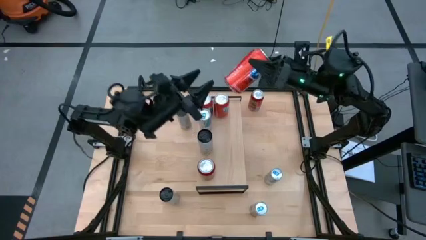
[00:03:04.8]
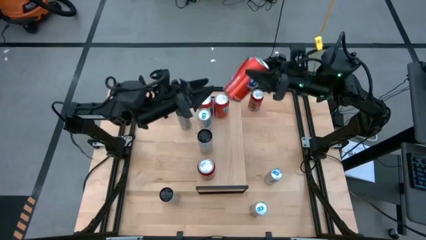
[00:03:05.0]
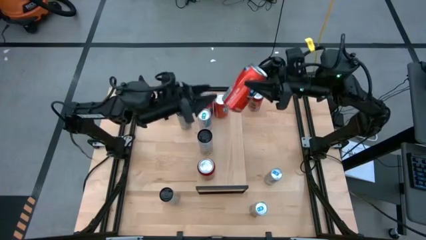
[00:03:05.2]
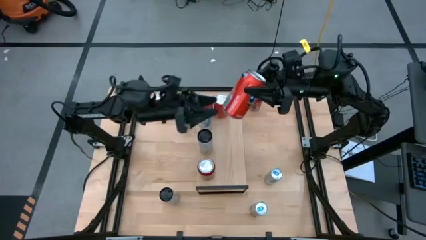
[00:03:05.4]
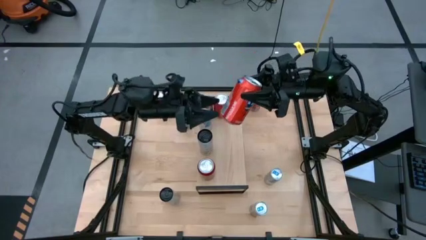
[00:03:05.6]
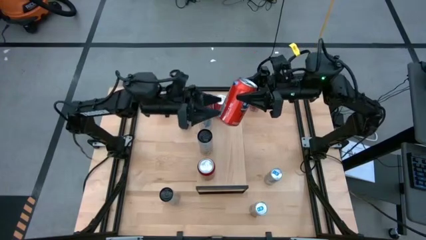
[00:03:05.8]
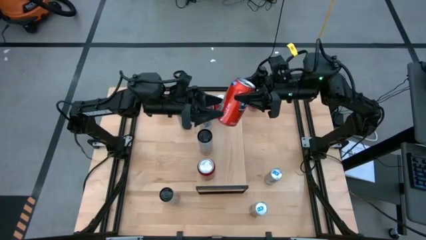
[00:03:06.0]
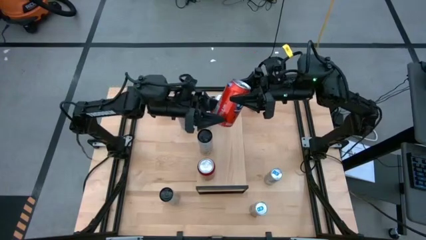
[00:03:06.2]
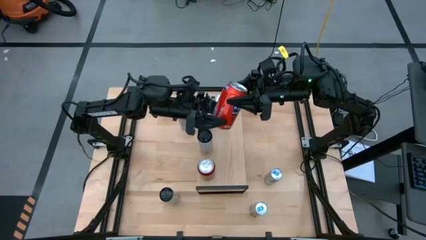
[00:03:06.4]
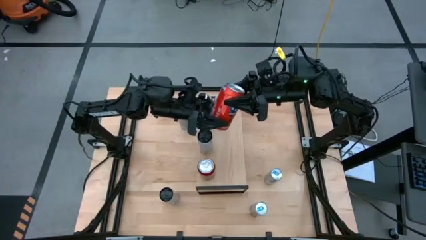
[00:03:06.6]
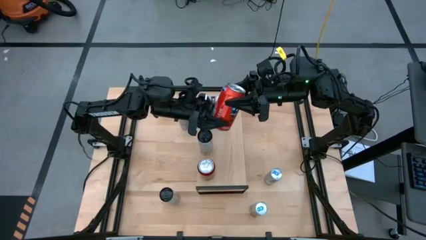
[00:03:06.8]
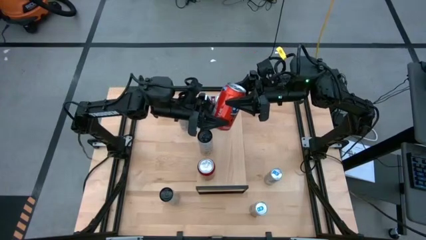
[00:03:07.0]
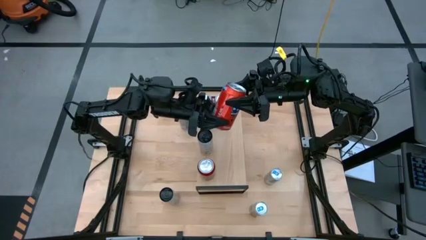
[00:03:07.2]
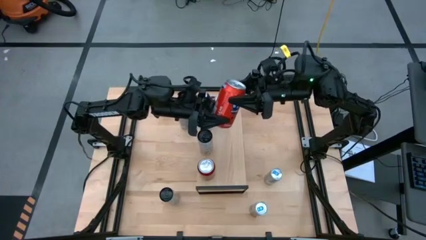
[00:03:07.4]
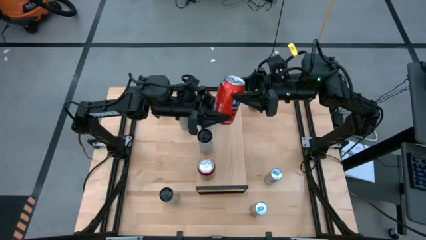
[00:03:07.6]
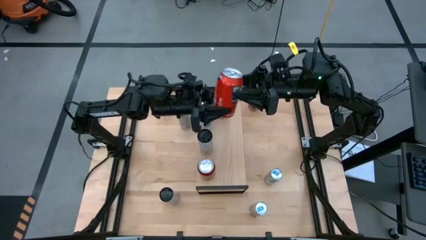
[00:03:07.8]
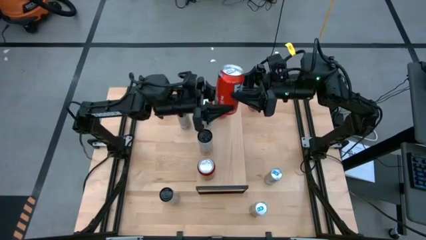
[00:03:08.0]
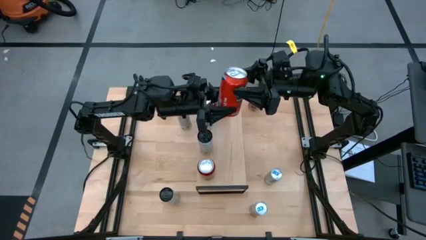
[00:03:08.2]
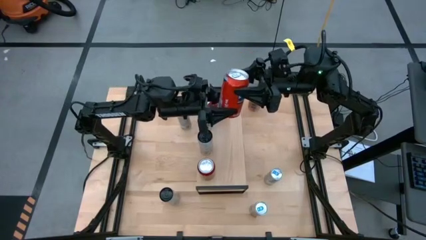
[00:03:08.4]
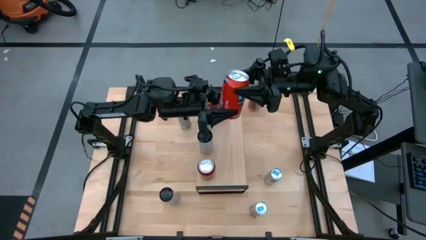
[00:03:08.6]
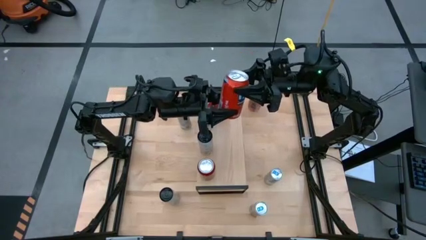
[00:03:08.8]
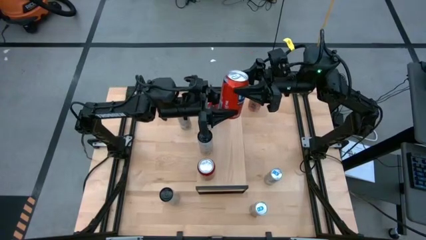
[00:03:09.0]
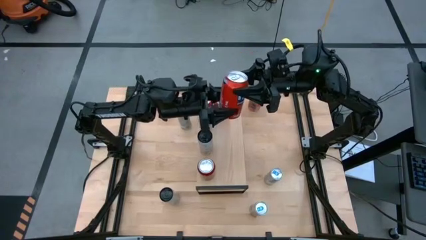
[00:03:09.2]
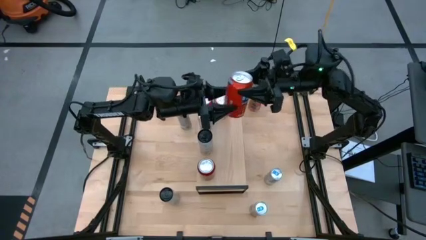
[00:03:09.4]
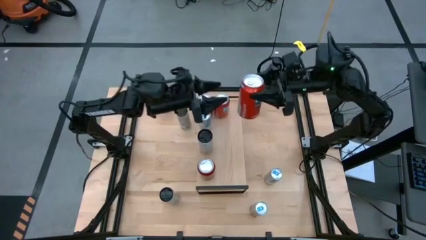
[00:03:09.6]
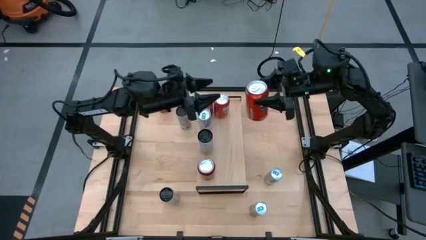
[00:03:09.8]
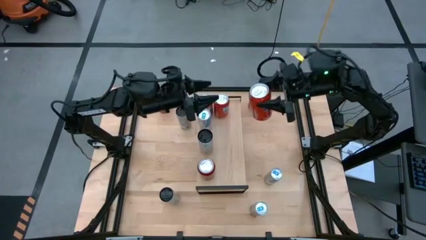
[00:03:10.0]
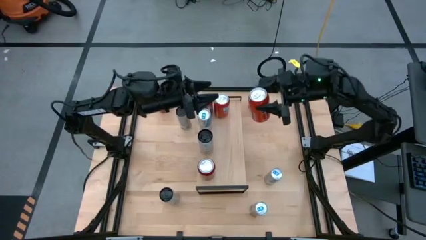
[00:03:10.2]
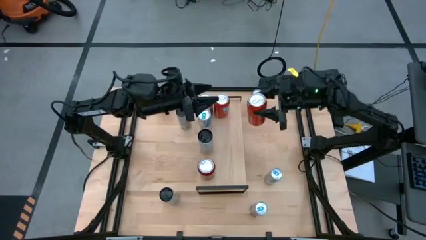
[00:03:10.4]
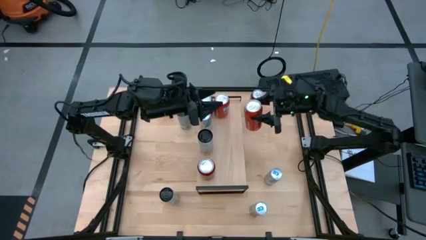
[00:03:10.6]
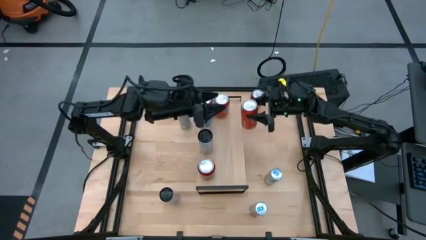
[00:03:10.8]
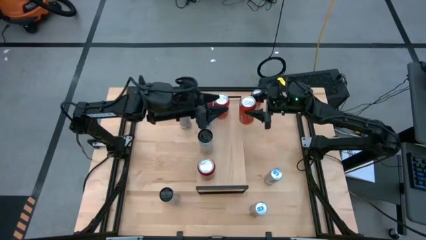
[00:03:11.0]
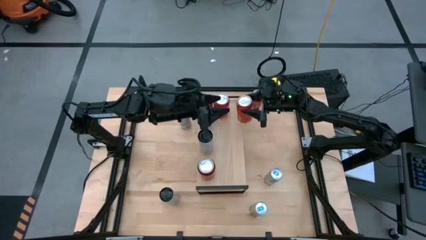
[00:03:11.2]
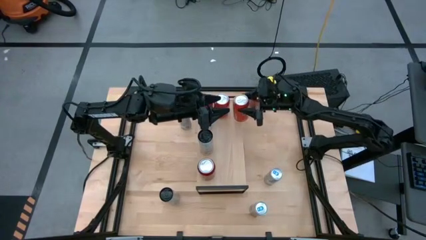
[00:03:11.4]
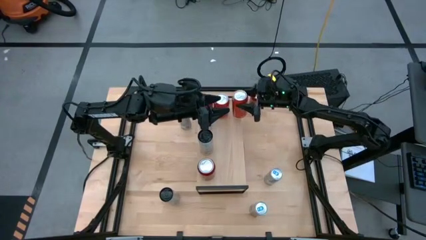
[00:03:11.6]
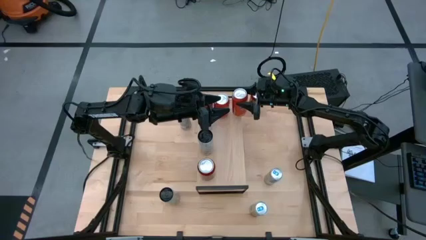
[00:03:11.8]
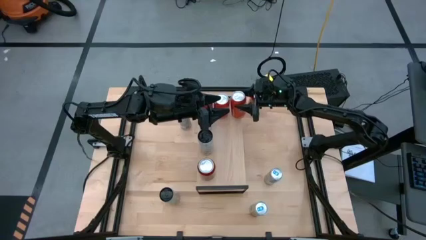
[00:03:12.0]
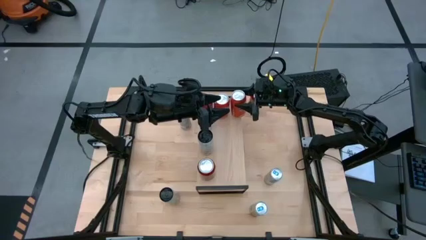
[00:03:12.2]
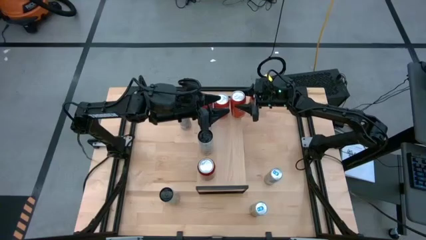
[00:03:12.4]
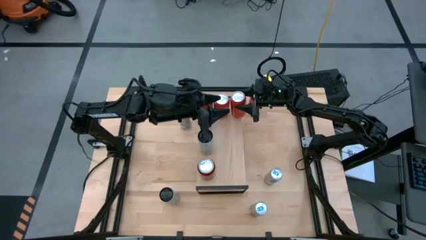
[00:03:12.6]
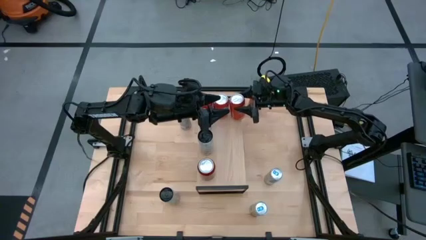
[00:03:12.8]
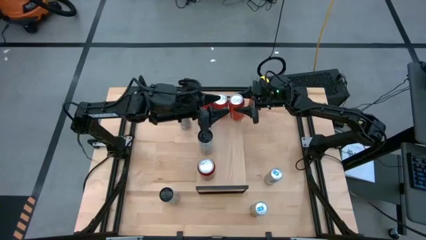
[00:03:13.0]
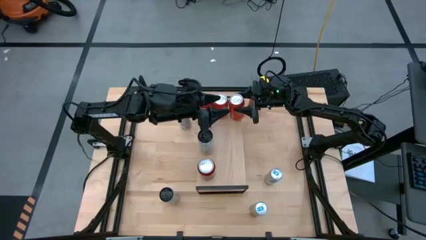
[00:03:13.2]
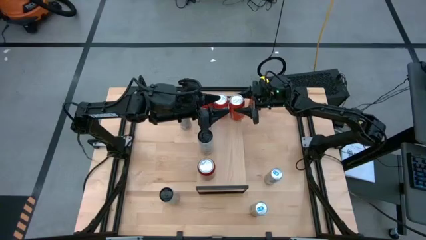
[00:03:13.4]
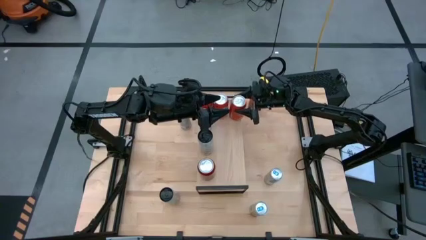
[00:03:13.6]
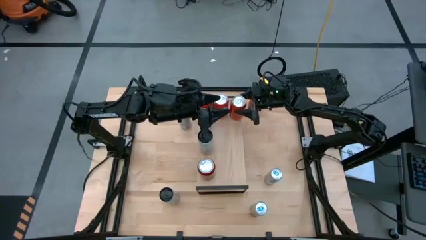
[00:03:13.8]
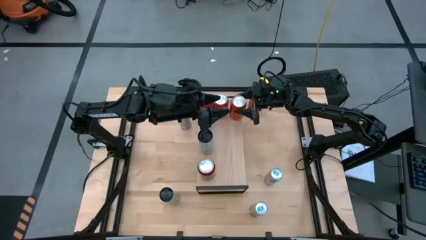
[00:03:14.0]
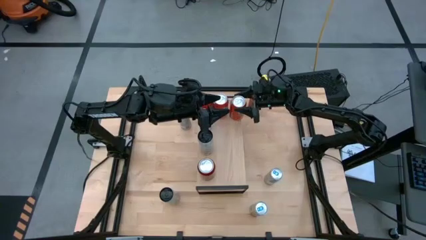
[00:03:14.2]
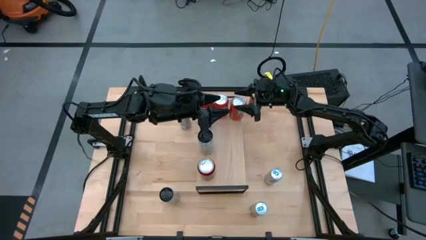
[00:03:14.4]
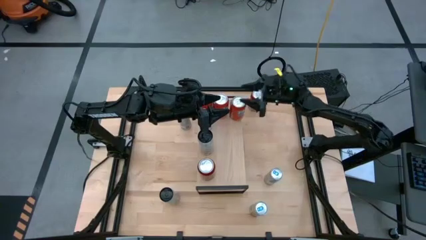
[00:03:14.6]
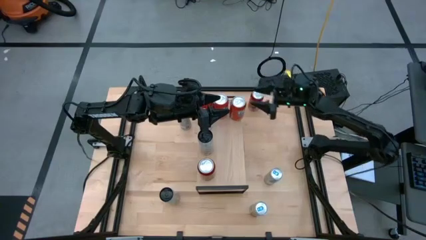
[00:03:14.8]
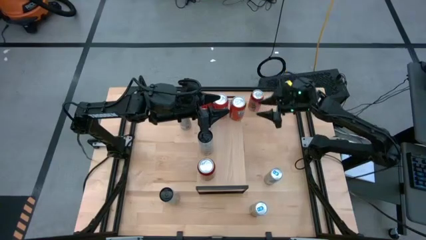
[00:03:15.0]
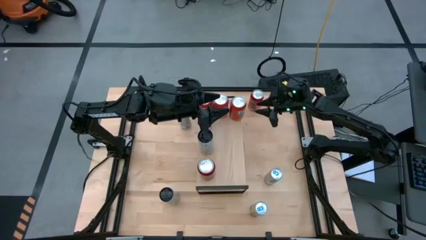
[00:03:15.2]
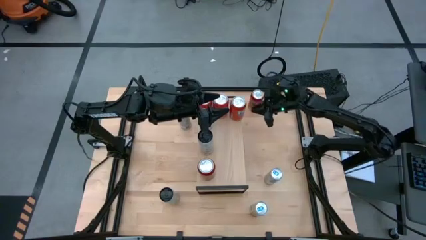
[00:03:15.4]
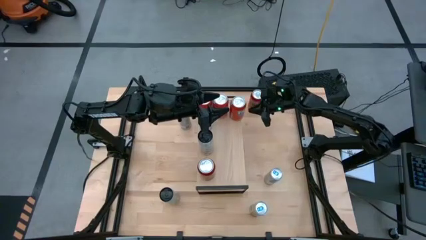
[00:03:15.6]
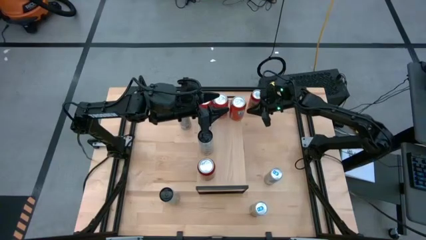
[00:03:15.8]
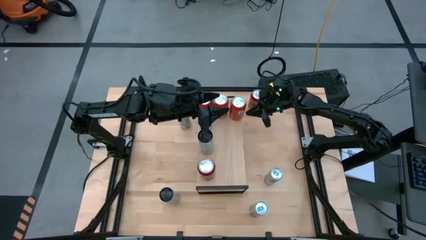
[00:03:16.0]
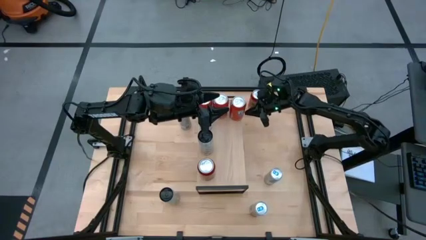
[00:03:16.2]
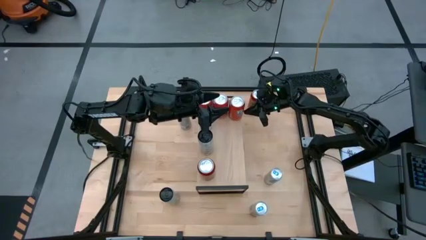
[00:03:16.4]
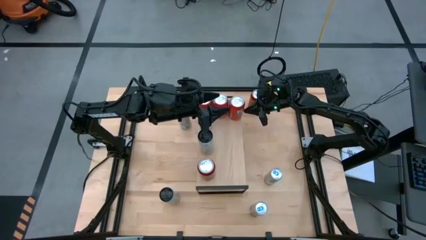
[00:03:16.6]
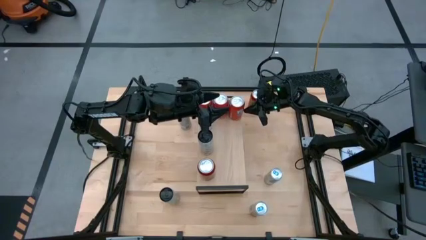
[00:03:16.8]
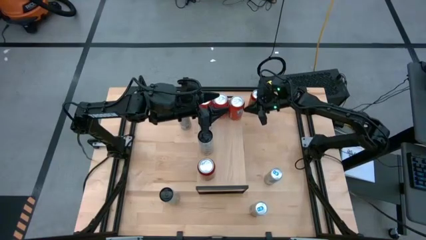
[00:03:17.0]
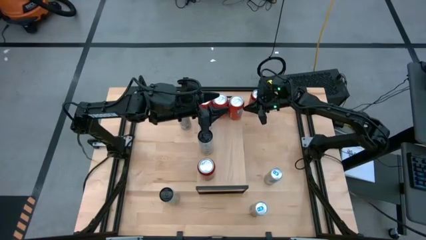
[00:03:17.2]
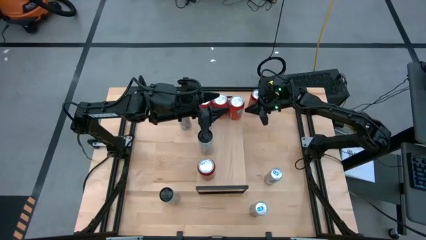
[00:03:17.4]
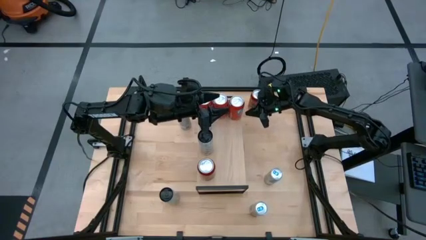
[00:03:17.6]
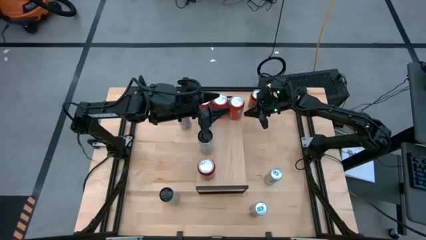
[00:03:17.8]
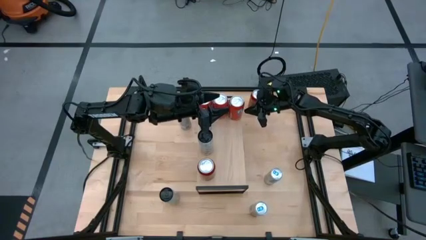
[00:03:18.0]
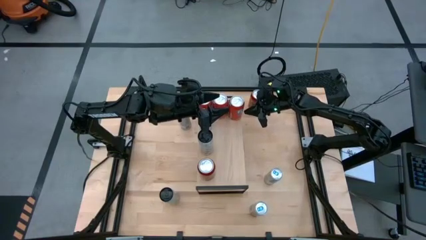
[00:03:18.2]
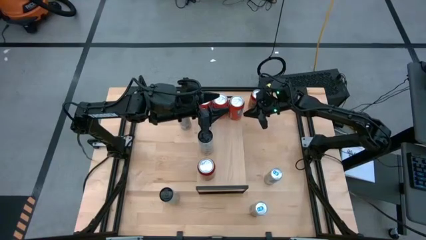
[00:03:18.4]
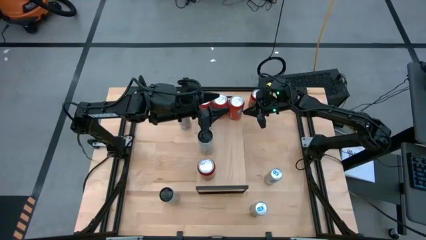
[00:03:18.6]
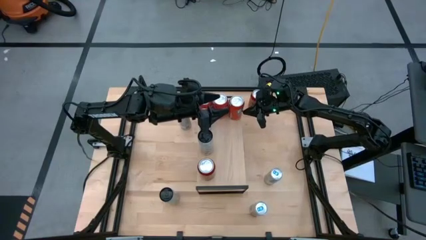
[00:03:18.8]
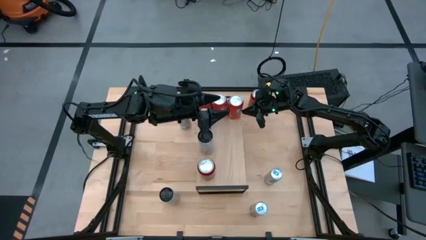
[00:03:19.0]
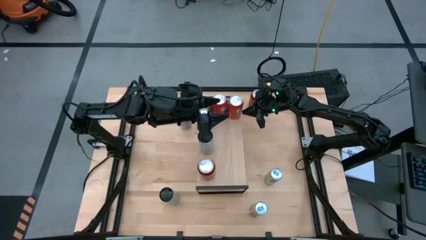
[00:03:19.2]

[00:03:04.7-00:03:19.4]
Task: Place canned beverage on shelf
Put the orange soda can on the shelf aligned with the other orange soda can
